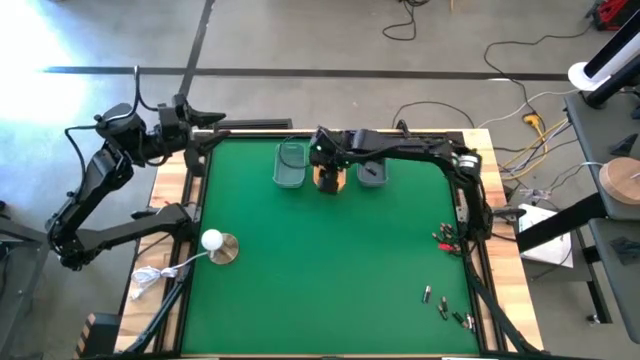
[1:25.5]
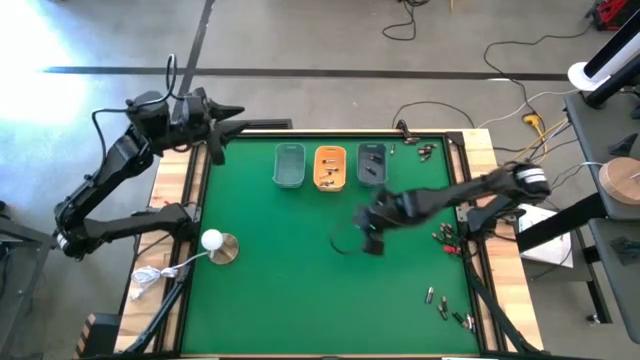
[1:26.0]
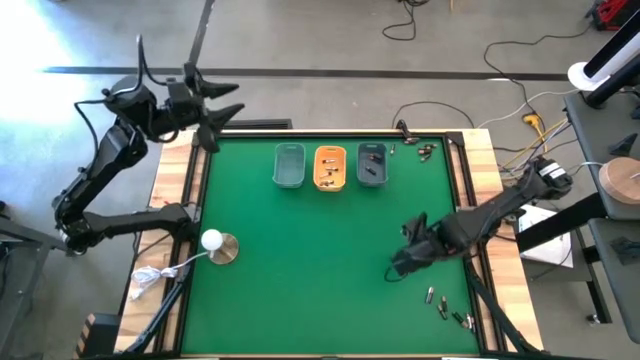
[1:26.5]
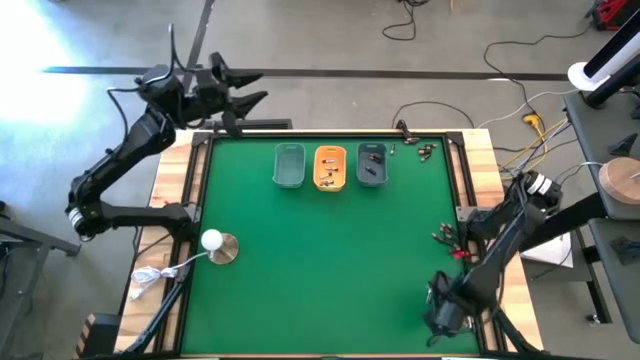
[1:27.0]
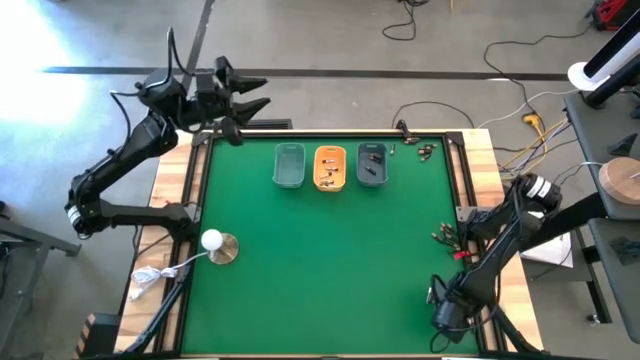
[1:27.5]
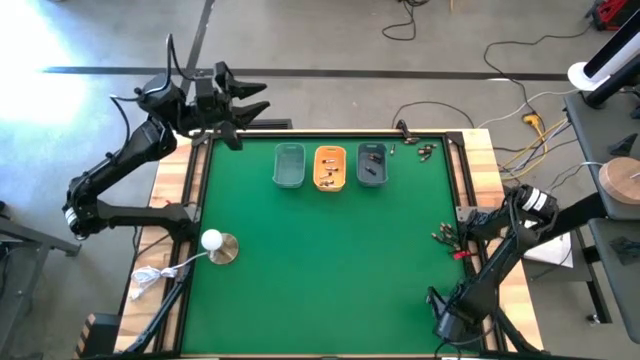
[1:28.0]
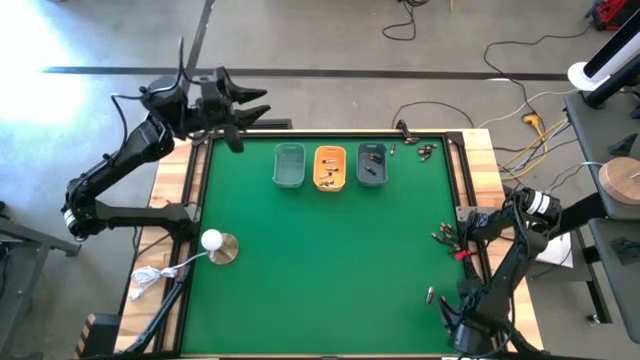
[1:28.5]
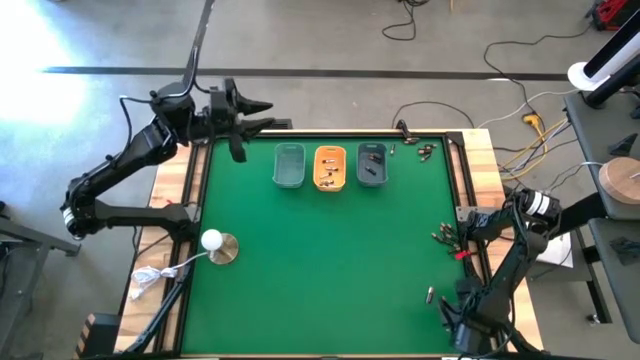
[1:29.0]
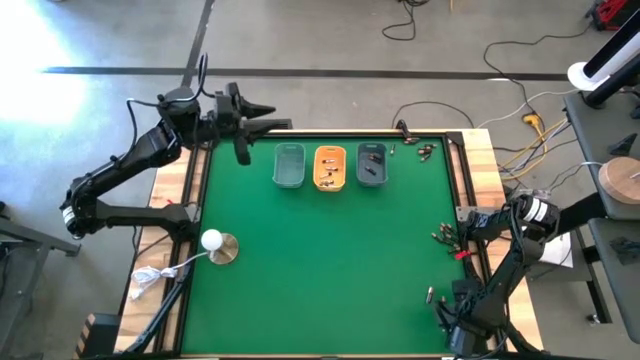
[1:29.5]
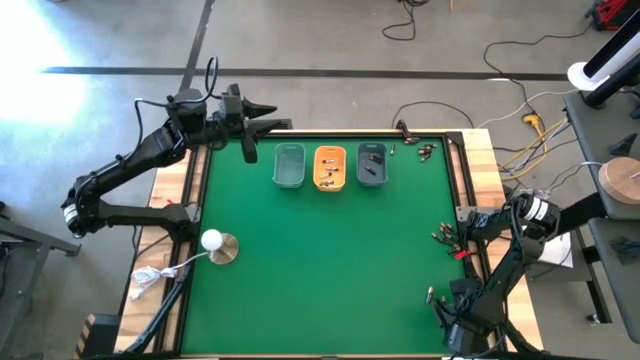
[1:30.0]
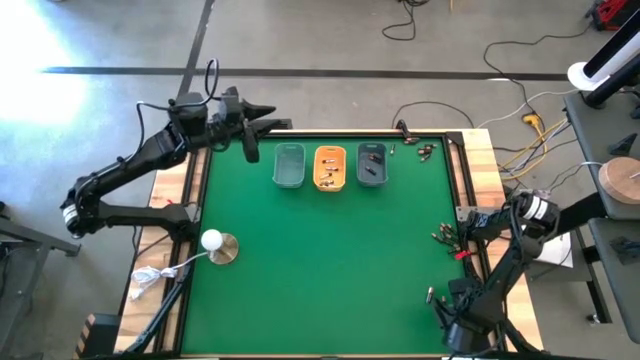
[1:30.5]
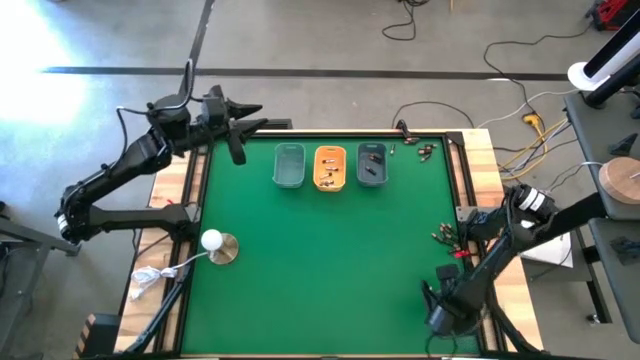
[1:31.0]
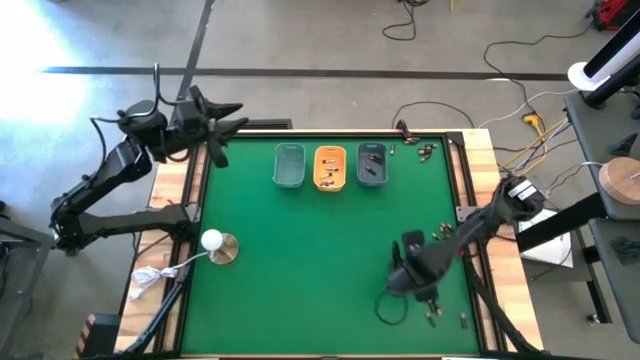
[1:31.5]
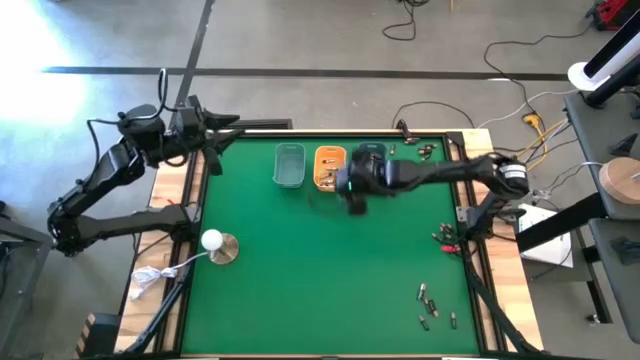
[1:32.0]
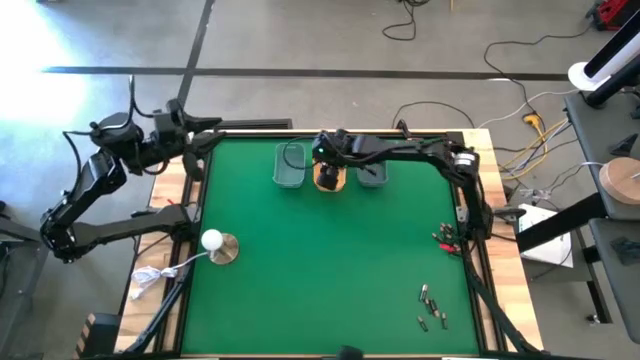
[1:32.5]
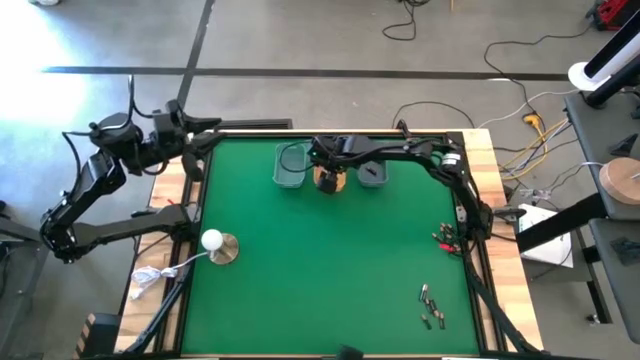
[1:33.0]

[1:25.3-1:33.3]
Task: Sort batteries
Put the silver battery into the yellow bin

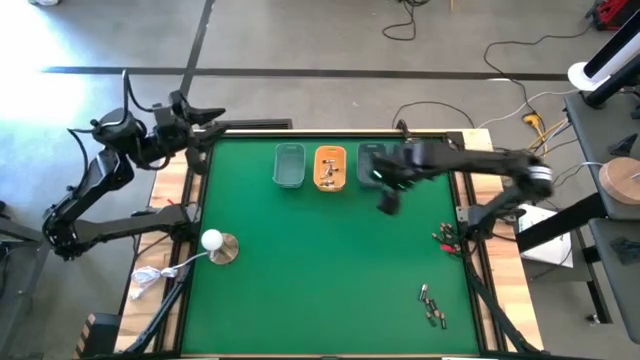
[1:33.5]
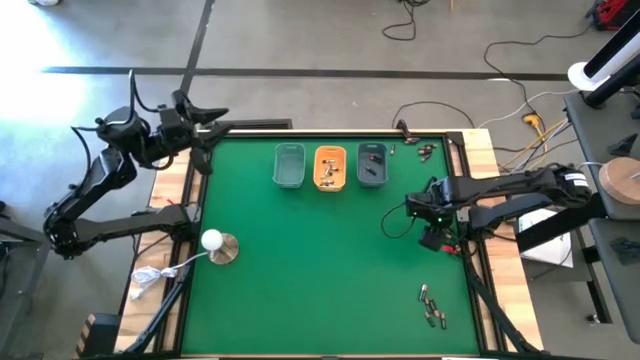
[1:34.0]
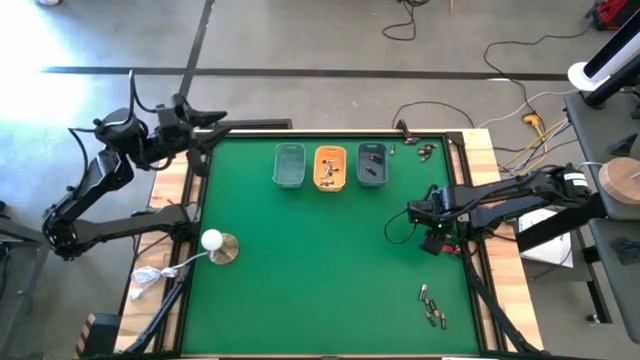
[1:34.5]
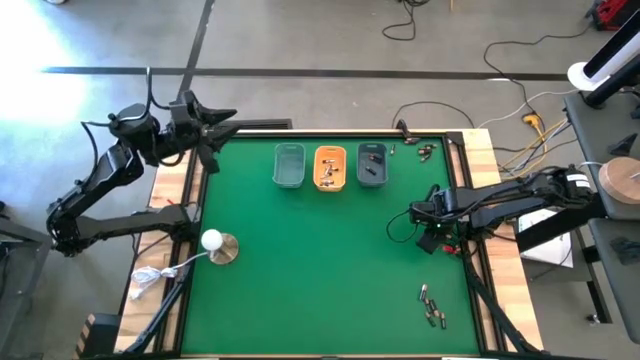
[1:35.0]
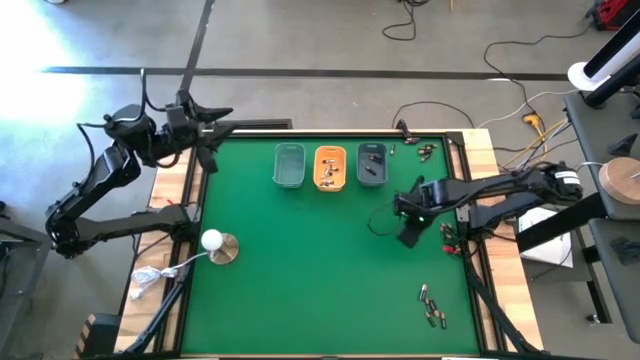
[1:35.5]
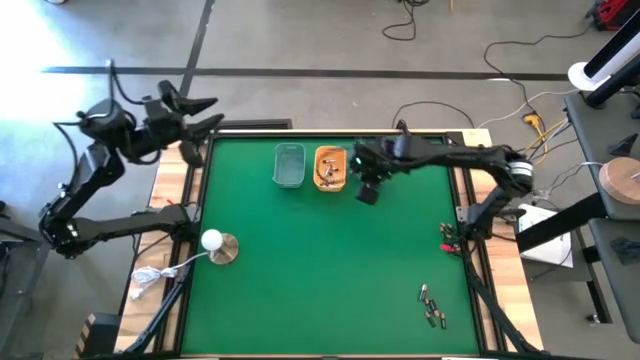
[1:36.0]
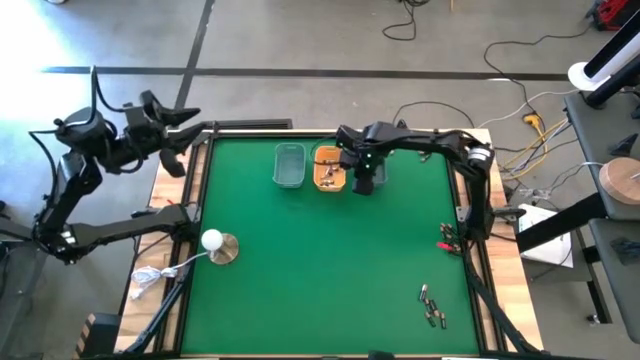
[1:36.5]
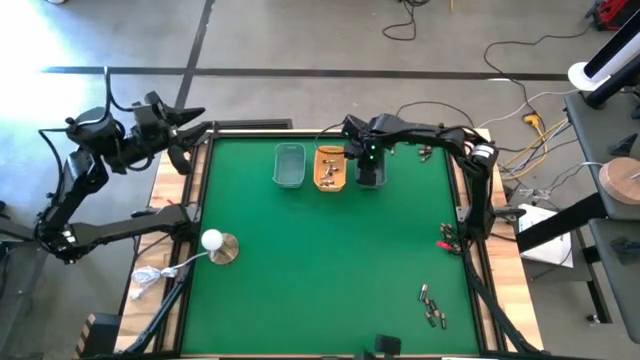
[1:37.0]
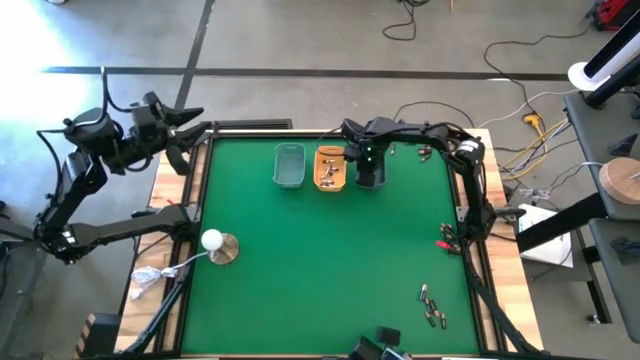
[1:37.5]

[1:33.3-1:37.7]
Put the small brown battery into the gray bin

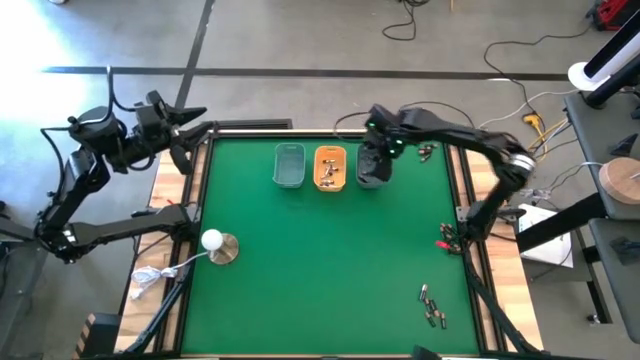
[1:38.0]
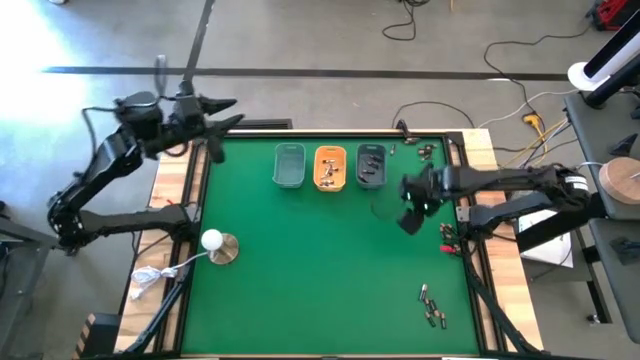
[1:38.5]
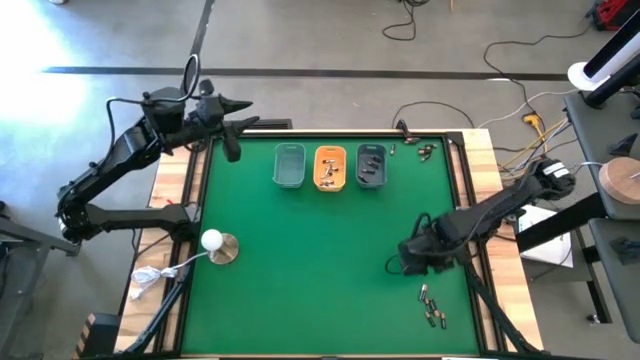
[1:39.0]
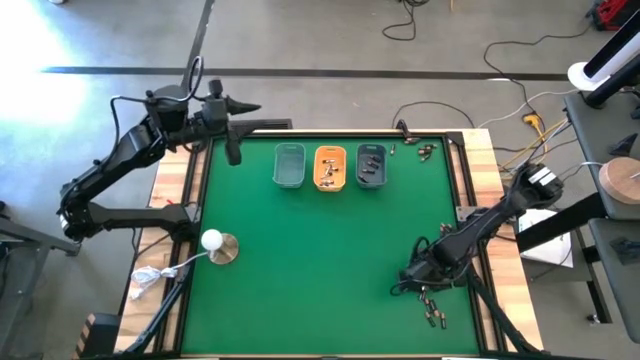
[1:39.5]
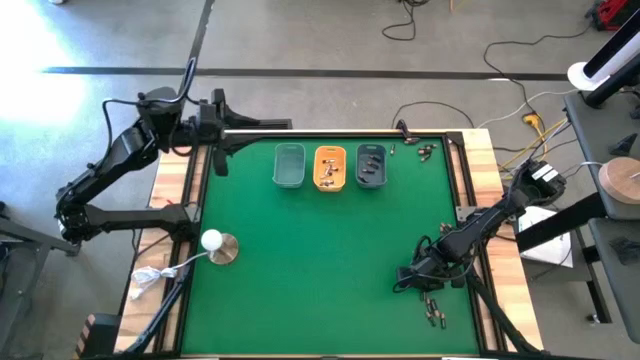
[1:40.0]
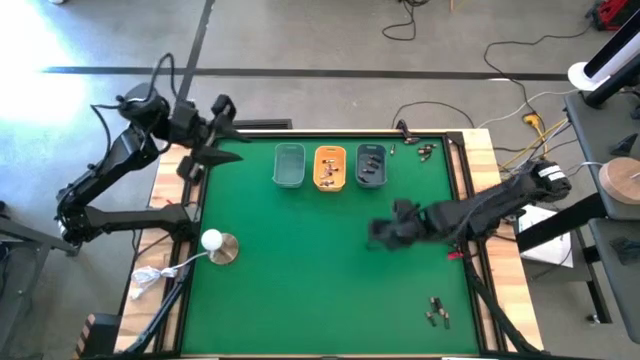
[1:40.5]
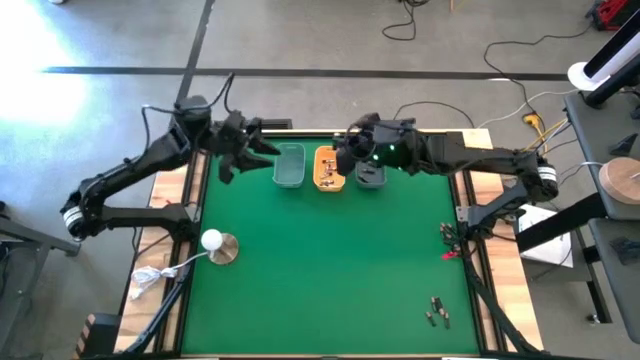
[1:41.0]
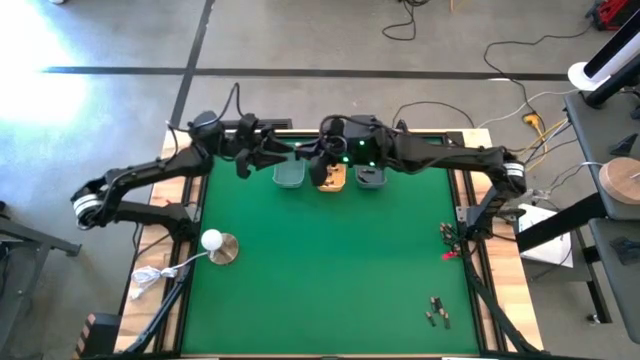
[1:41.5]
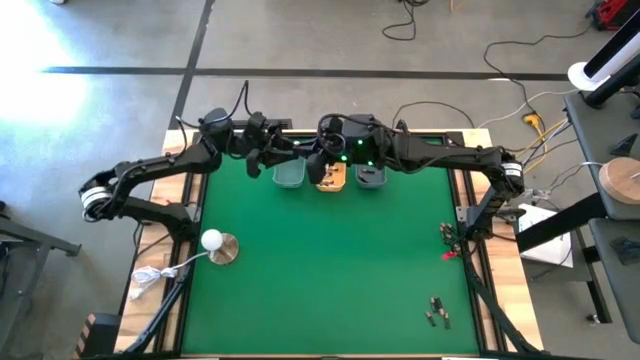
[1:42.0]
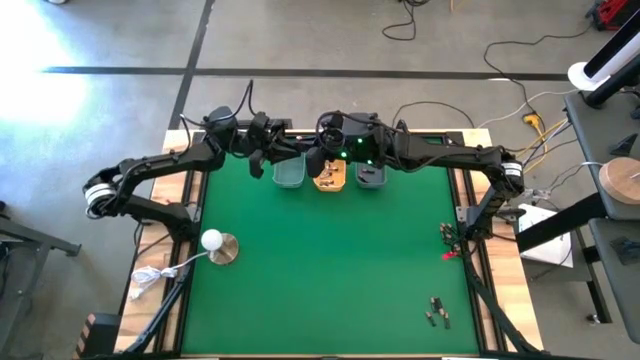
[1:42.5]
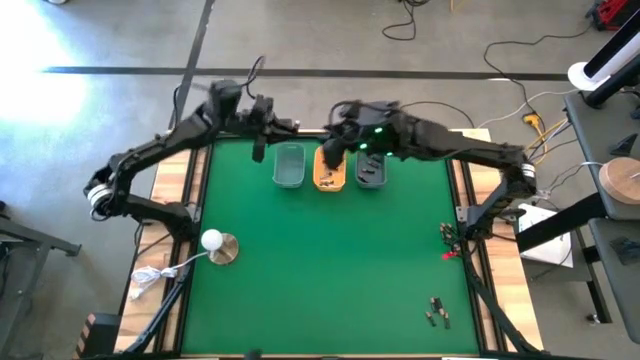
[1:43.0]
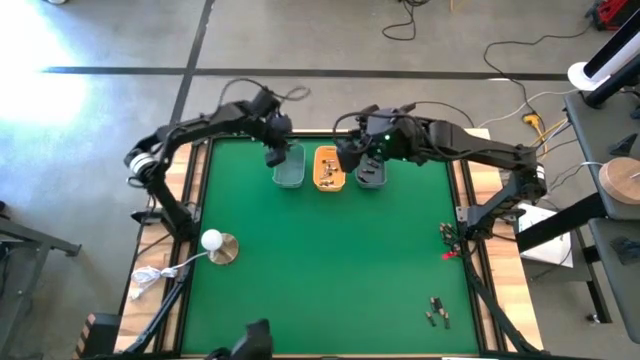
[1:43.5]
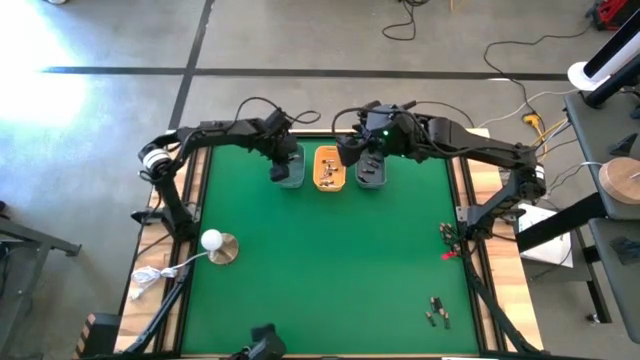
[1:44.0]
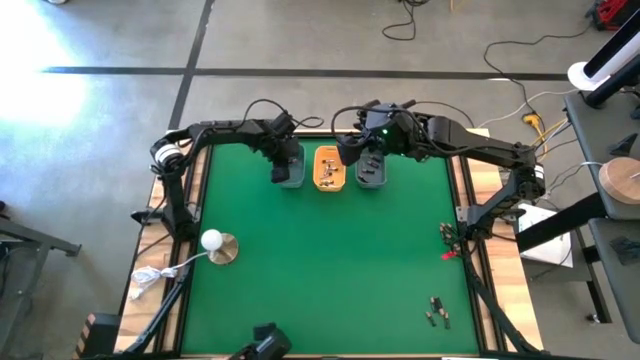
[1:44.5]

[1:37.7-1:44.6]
Put the big brown battery into the green bin

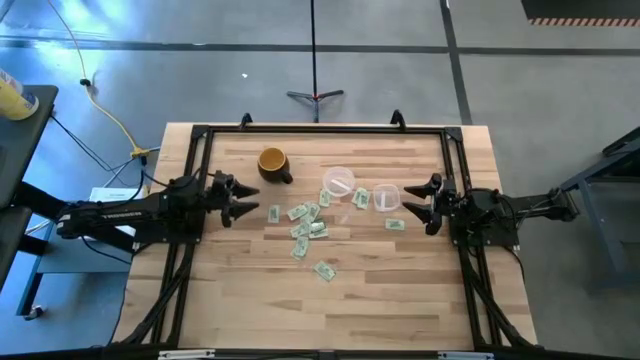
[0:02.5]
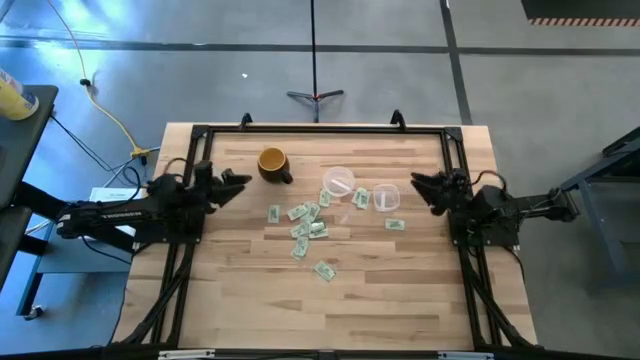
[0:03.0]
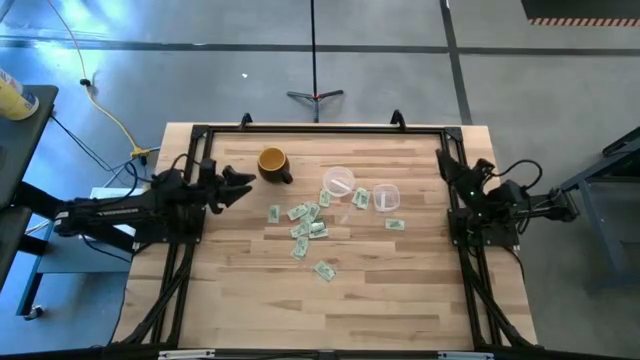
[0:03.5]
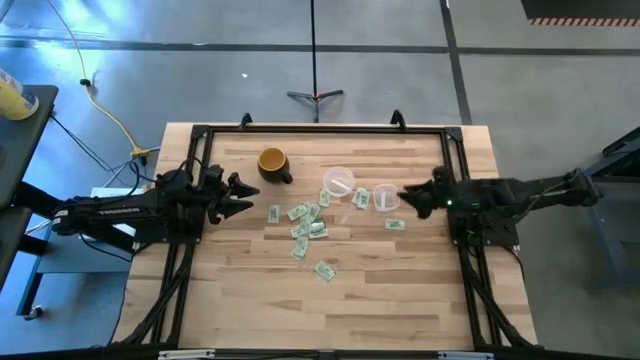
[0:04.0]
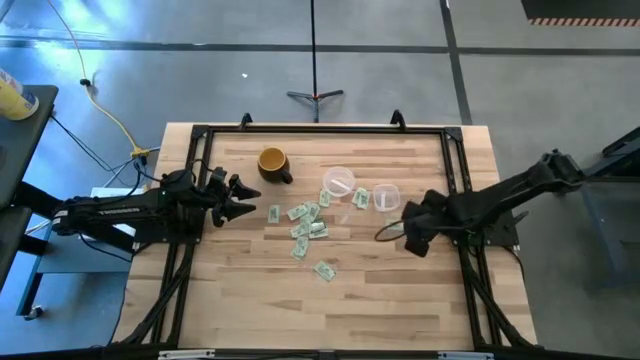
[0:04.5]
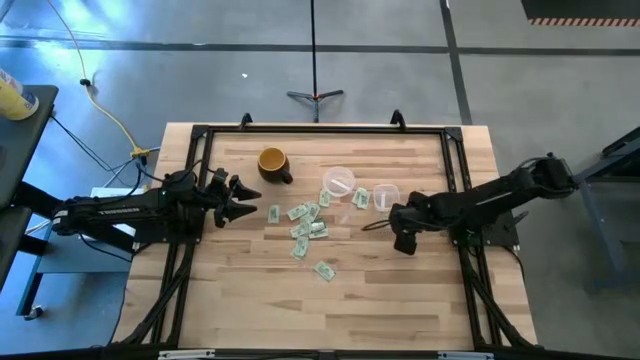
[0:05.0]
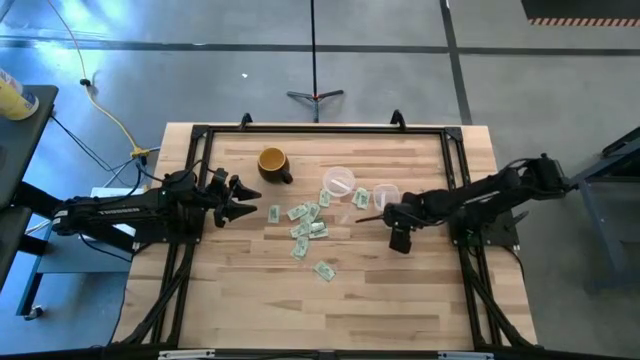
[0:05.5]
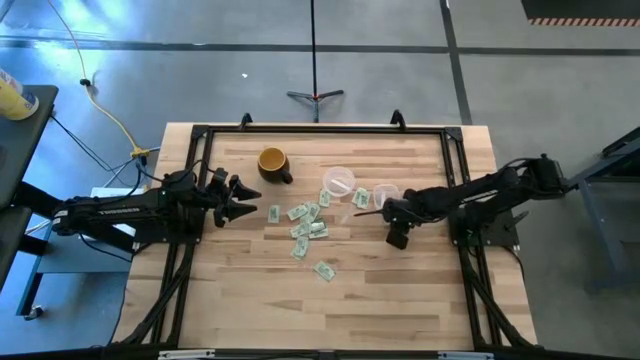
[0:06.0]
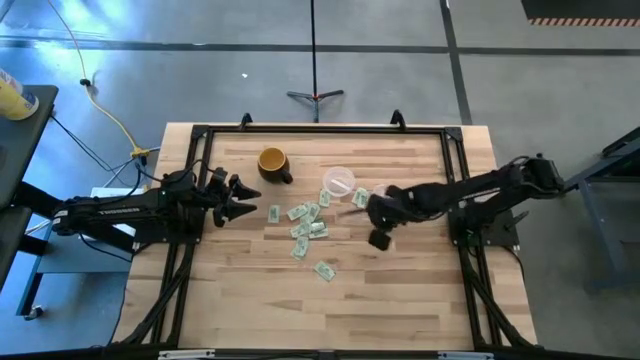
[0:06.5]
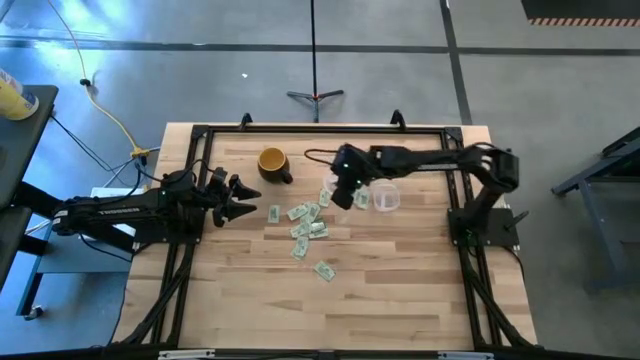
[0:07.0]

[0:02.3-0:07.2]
Task: Pick and place items into bin
Put the light green stevia packet into the left transparent bin
